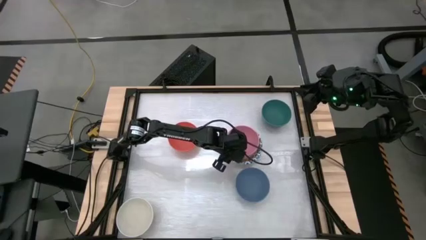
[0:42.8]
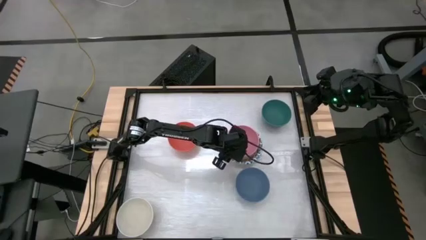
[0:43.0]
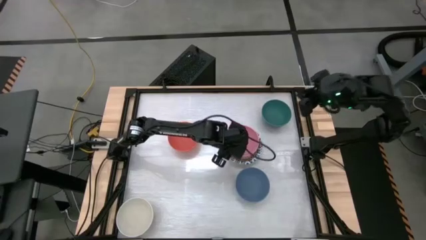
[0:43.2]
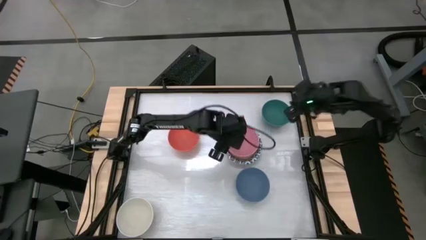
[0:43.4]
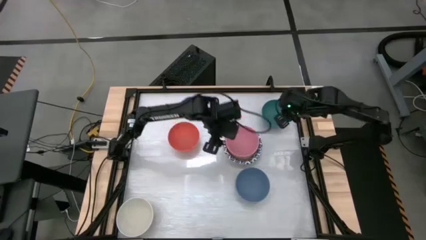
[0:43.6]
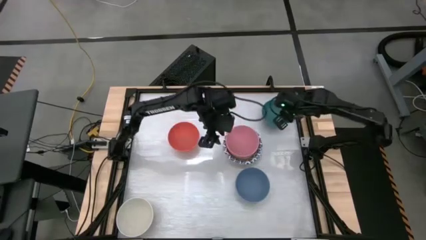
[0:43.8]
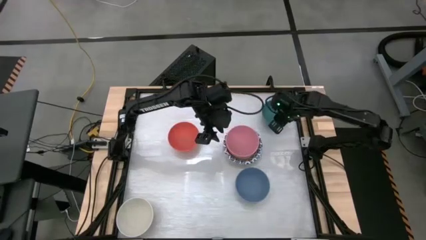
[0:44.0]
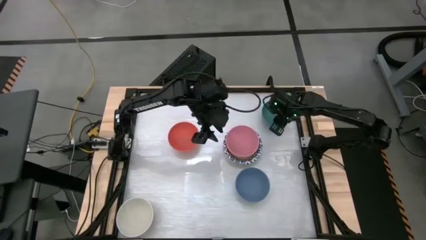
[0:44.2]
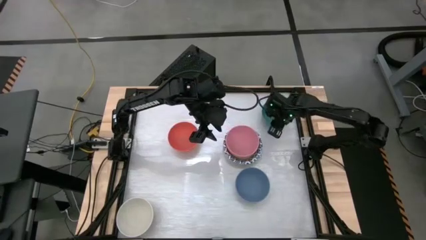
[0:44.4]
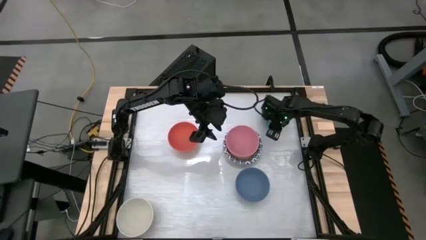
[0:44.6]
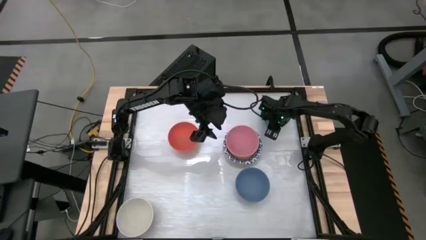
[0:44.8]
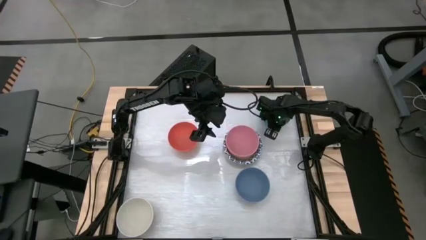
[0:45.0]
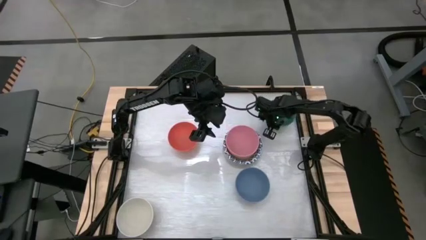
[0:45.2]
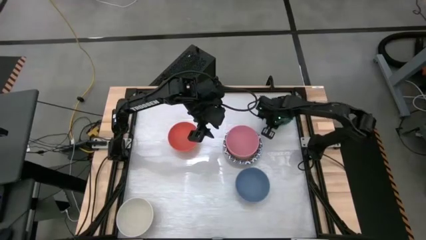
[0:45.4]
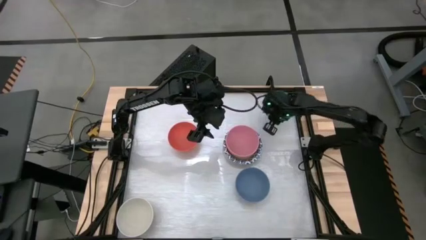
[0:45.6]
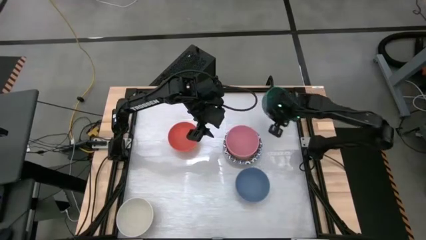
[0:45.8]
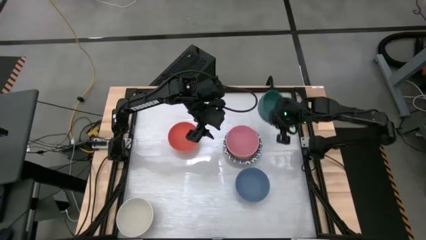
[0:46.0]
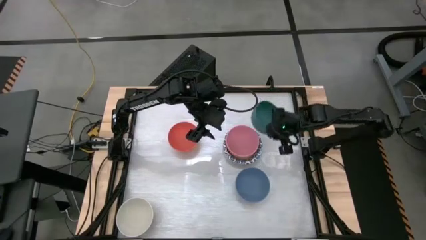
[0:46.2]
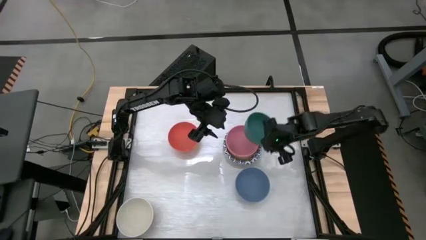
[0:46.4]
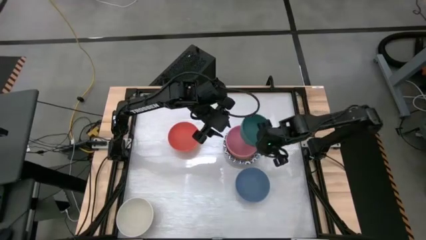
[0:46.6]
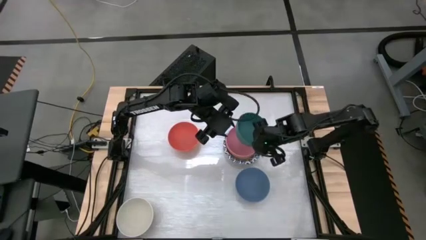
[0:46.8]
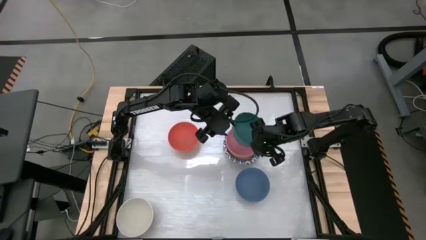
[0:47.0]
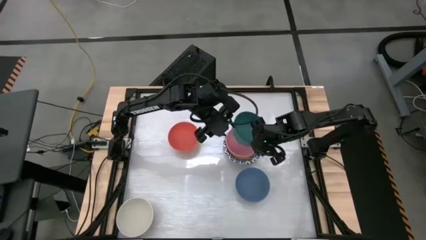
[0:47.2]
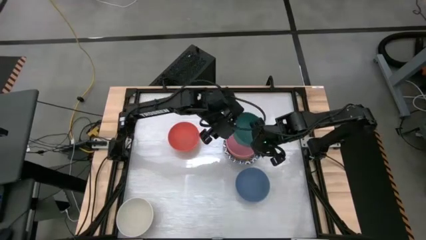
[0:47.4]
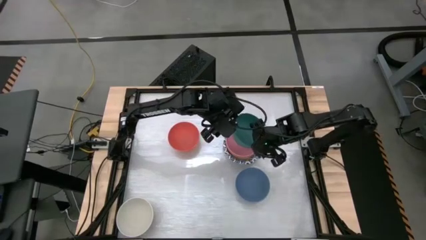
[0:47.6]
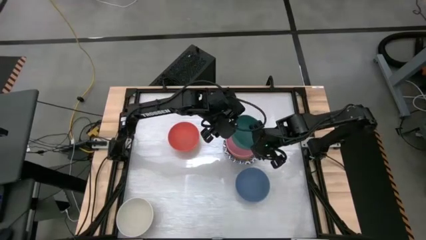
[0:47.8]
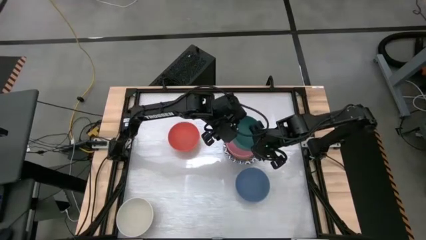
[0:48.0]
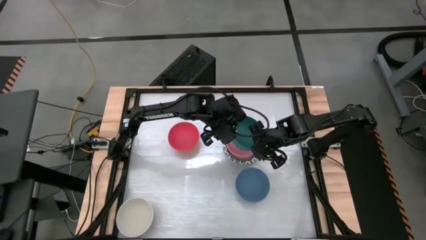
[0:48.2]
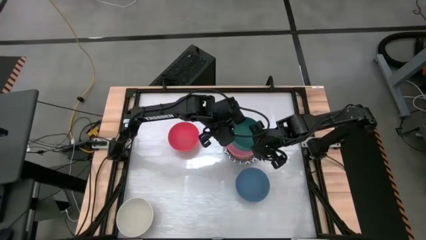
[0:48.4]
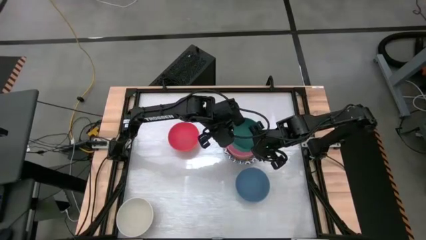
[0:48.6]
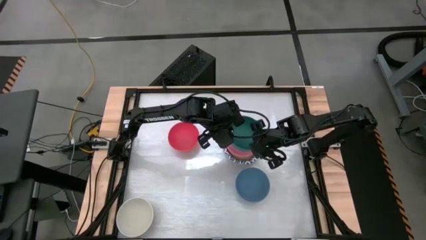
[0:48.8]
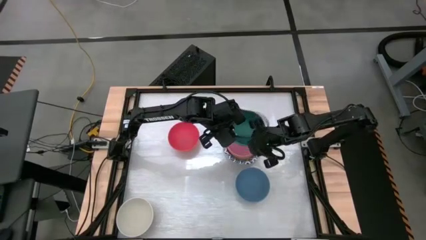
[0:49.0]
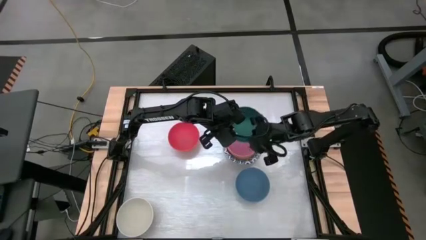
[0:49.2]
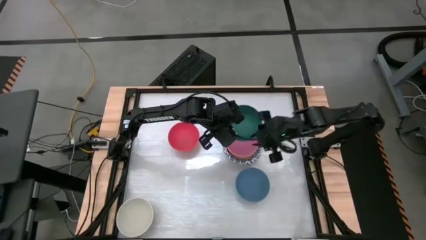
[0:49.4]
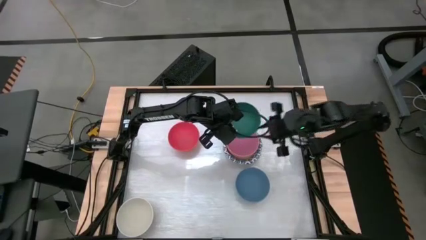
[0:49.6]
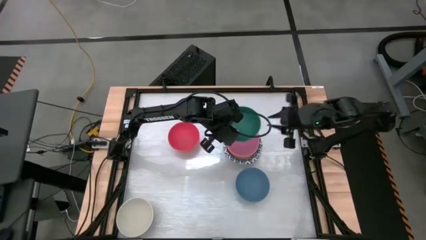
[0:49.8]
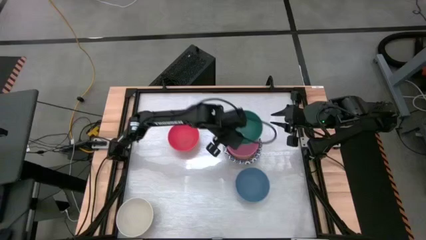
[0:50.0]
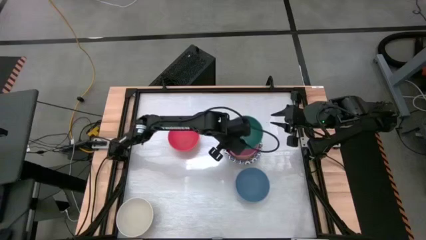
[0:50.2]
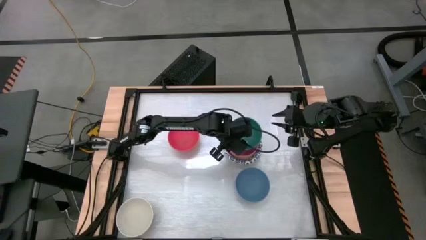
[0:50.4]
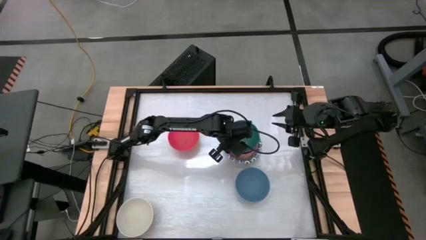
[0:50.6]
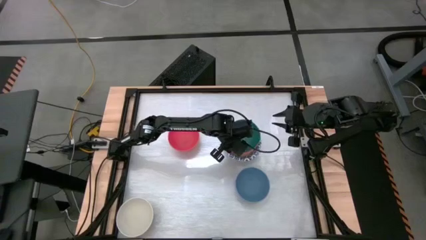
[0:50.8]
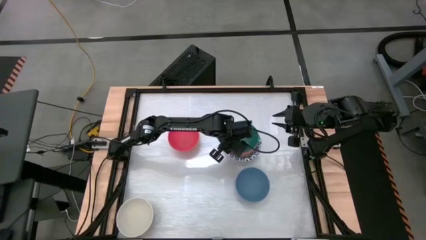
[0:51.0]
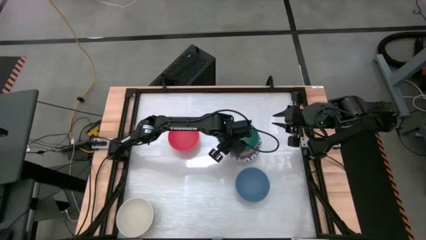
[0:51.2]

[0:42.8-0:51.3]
Stack the green bowl on top of the pink bowl

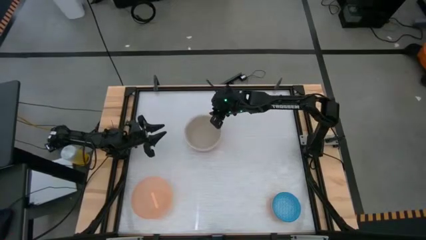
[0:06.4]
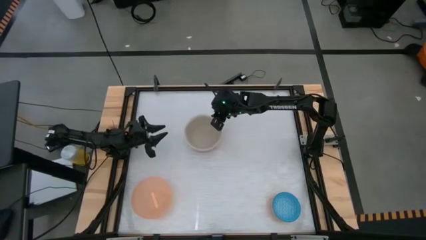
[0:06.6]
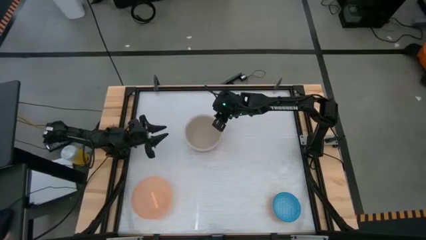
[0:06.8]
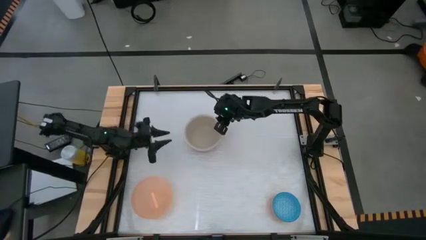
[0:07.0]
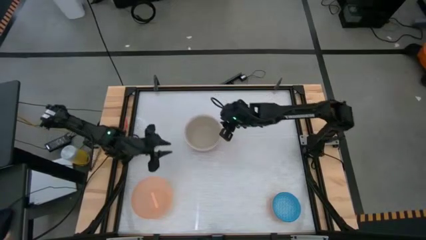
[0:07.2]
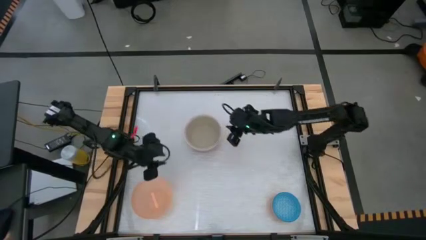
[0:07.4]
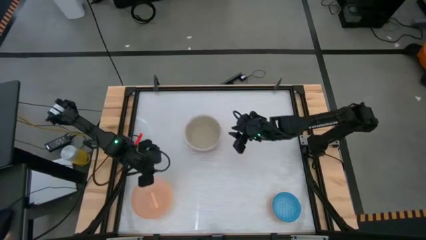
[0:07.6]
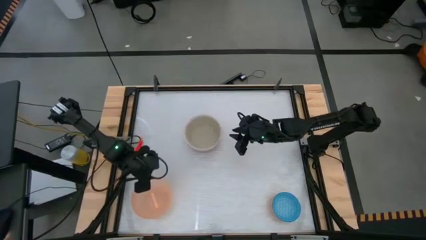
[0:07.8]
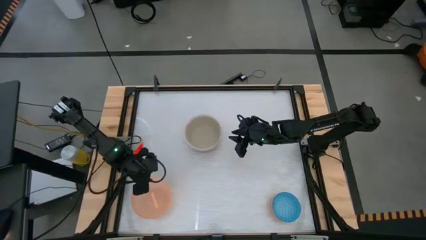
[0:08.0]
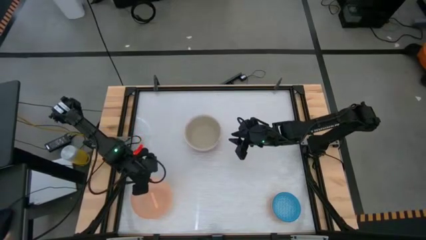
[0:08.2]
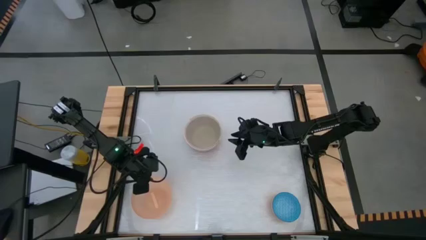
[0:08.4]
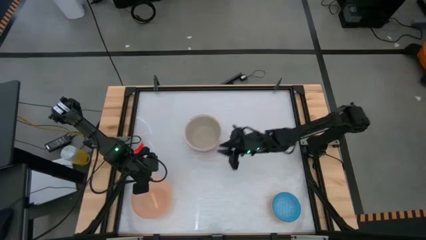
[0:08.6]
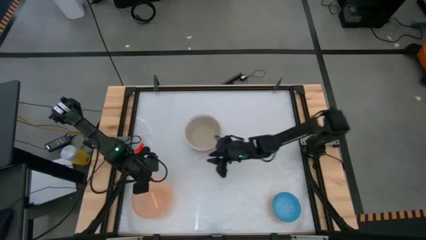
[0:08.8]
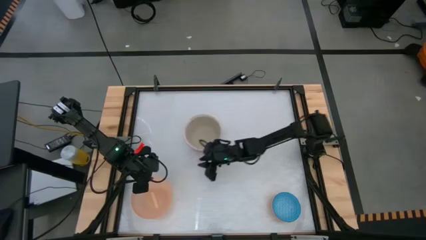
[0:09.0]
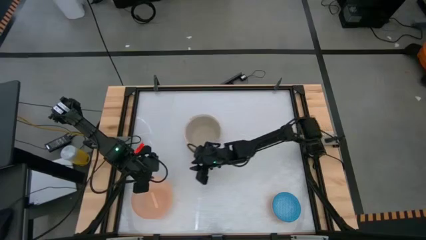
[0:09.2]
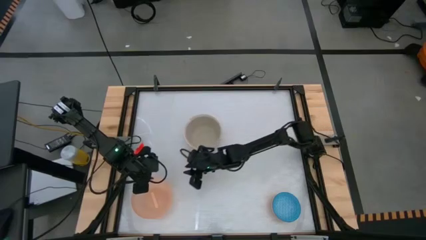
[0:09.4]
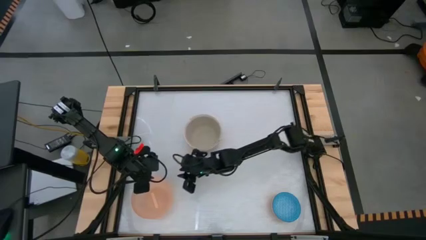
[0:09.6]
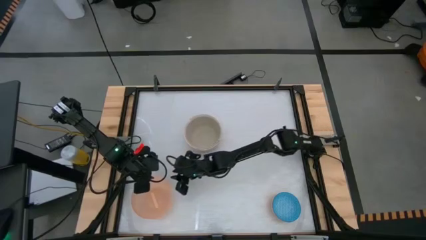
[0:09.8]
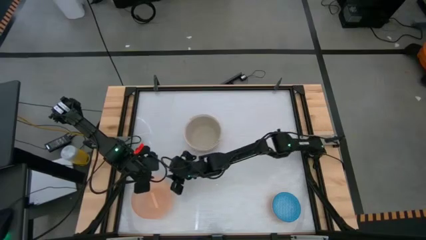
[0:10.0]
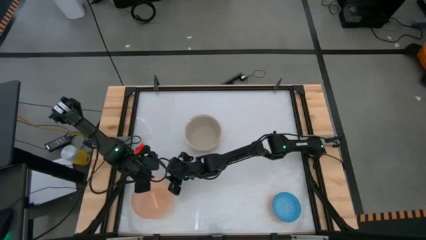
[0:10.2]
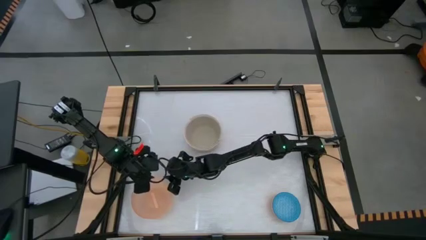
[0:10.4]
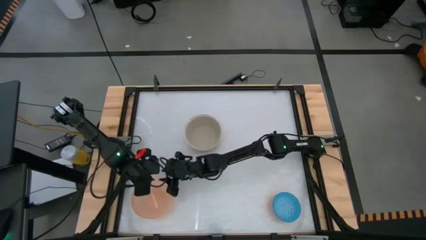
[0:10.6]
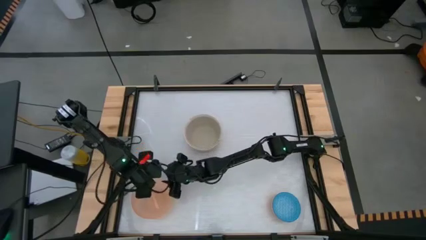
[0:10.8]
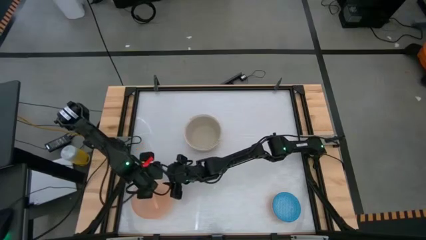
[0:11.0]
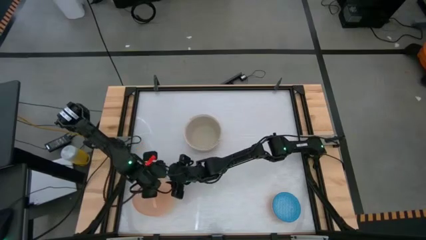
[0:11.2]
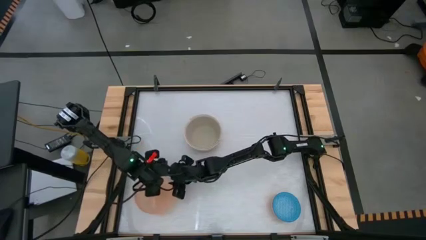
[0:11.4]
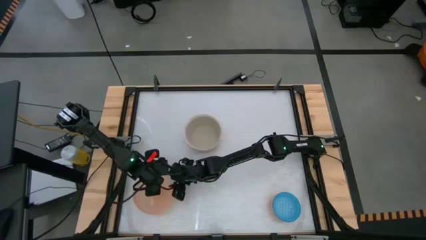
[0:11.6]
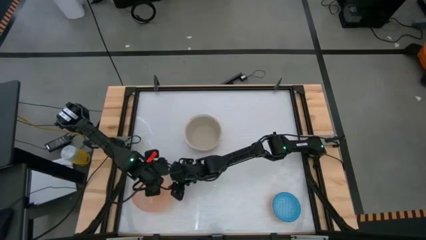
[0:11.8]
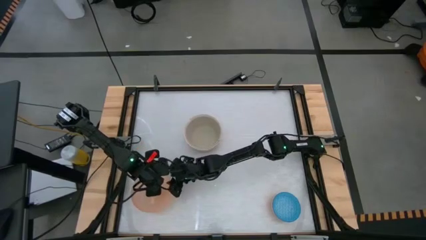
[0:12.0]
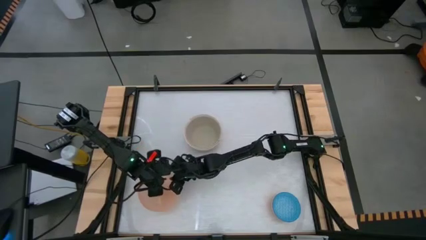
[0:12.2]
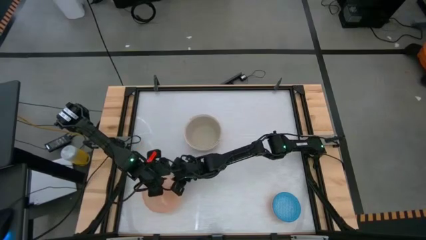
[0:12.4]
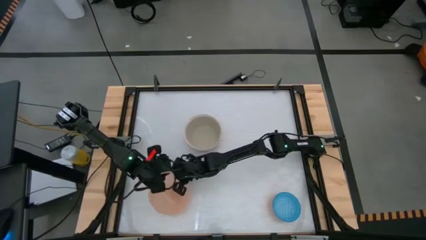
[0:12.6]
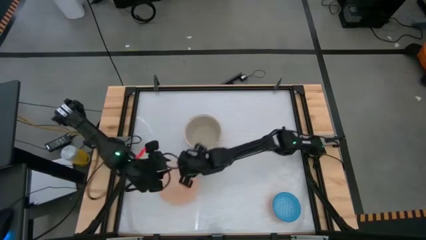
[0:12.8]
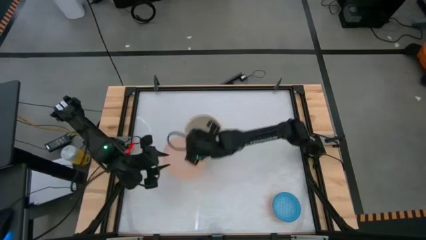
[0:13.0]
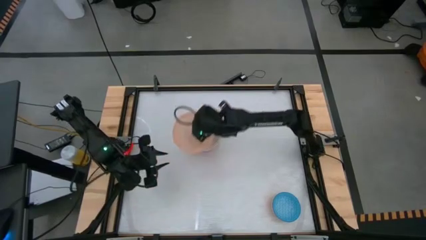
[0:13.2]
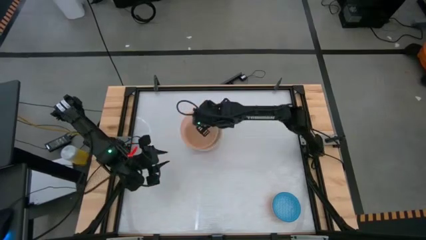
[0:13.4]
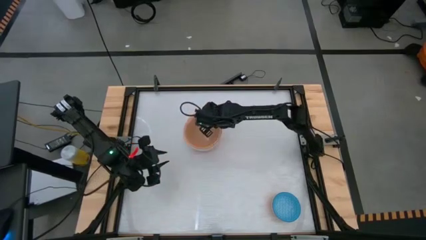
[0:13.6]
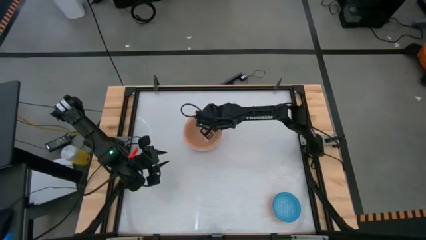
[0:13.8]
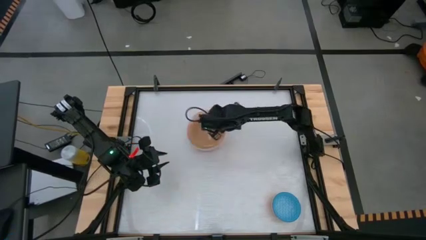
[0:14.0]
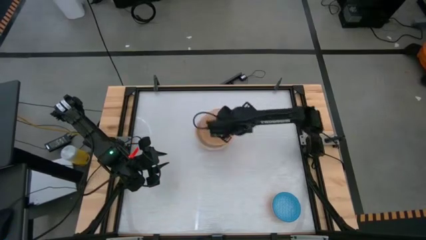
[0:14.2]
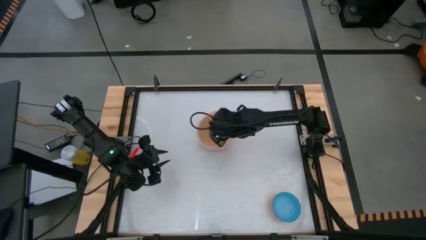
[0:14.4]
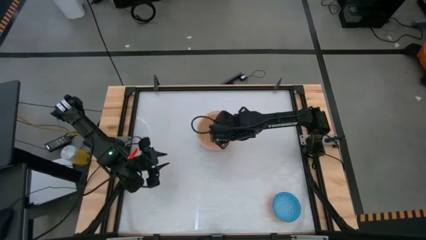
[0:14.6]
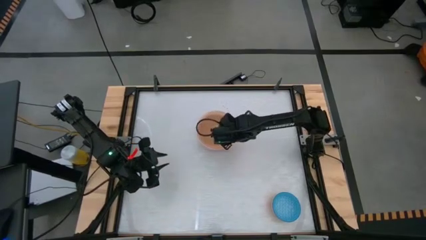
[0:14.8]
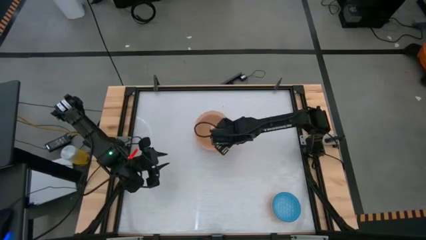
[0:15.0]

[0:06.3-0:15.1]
Stack the orange bowl on the gray bowl
